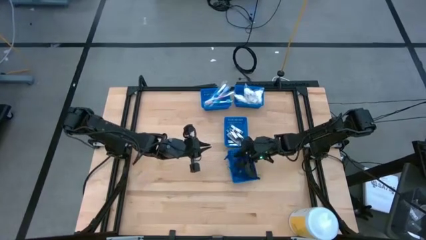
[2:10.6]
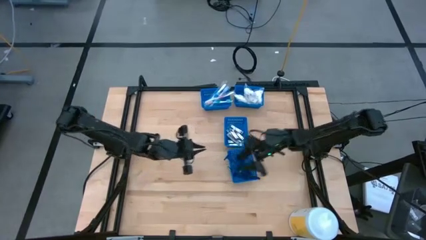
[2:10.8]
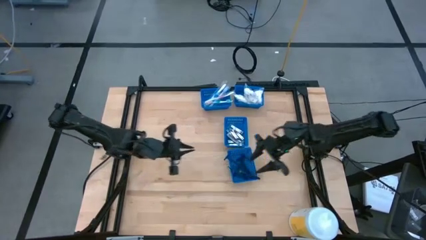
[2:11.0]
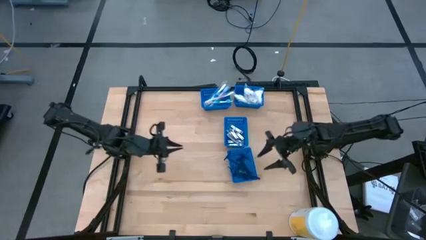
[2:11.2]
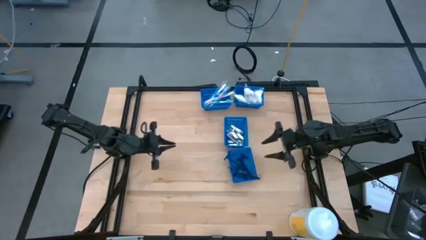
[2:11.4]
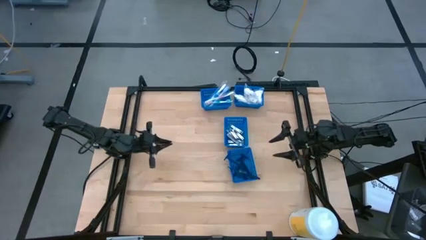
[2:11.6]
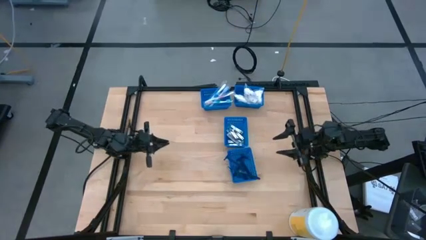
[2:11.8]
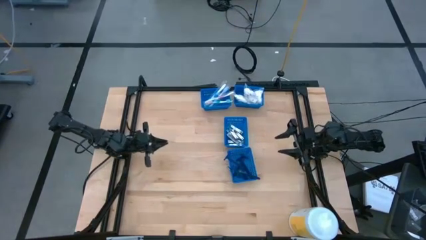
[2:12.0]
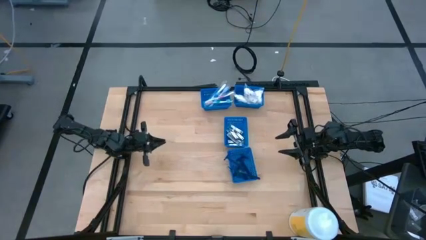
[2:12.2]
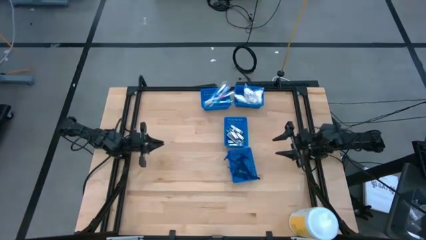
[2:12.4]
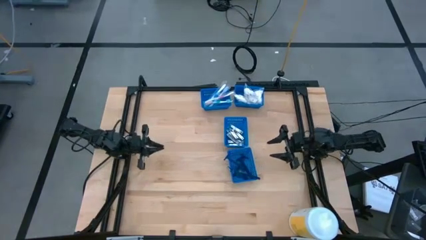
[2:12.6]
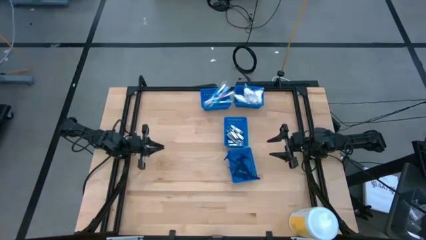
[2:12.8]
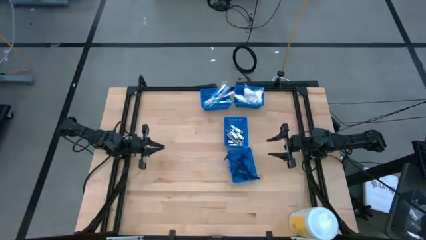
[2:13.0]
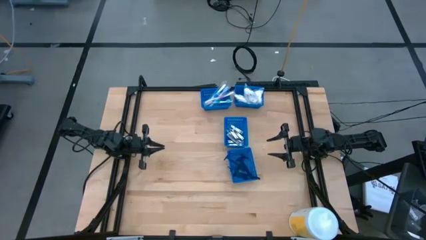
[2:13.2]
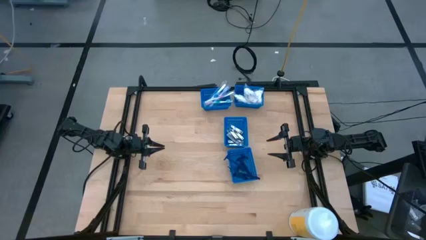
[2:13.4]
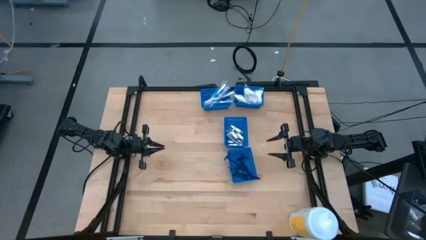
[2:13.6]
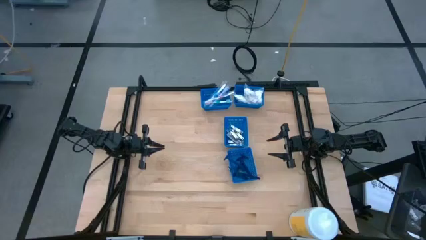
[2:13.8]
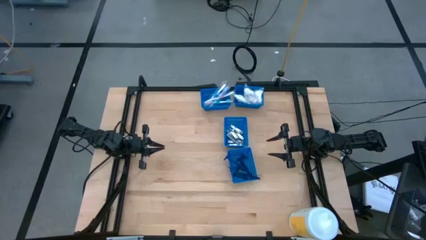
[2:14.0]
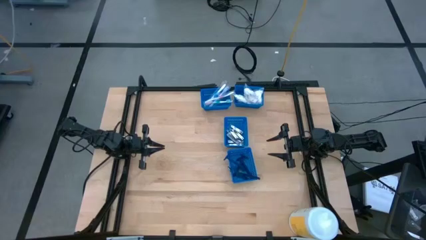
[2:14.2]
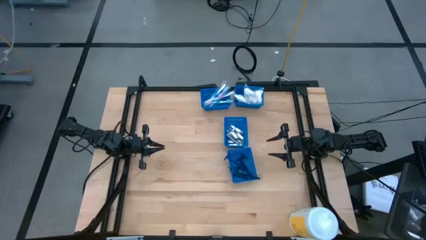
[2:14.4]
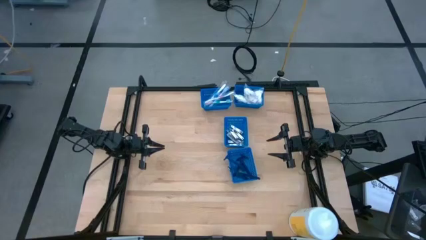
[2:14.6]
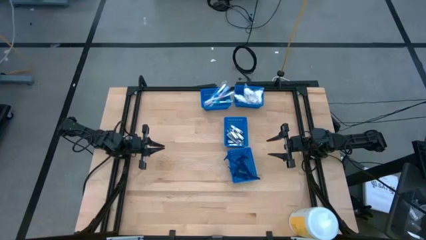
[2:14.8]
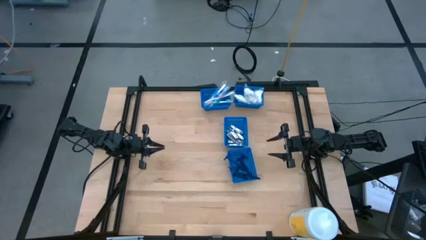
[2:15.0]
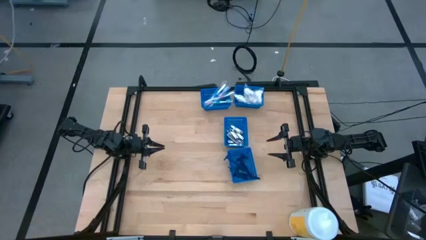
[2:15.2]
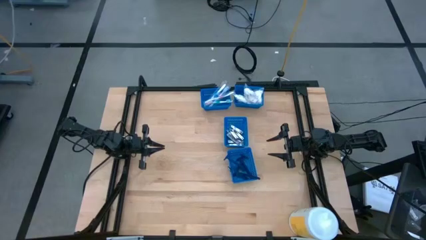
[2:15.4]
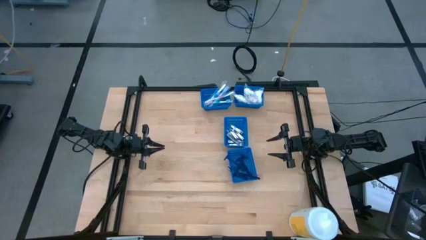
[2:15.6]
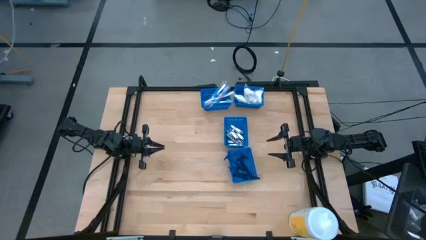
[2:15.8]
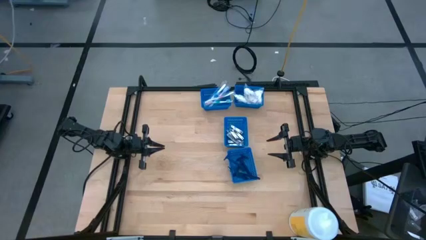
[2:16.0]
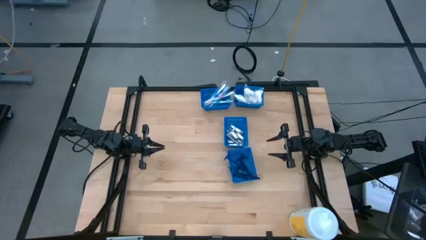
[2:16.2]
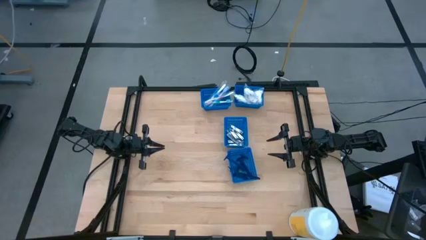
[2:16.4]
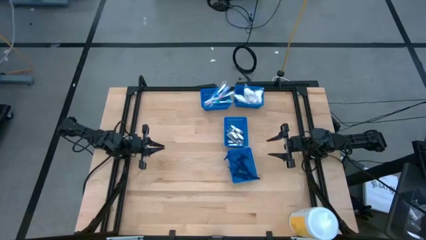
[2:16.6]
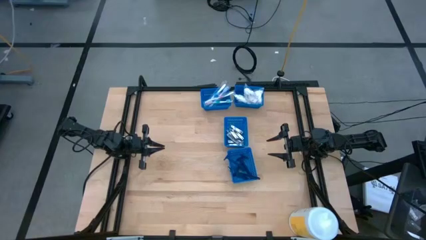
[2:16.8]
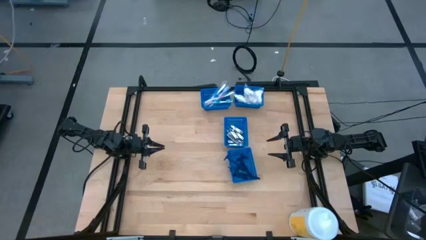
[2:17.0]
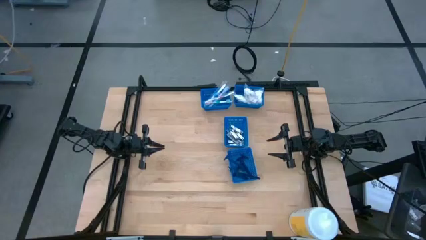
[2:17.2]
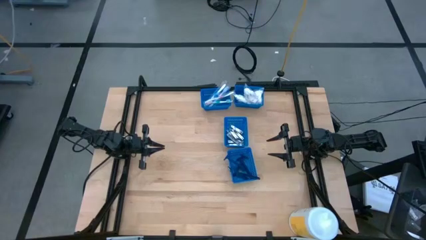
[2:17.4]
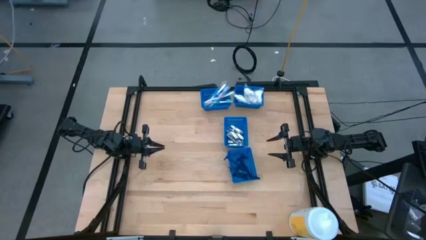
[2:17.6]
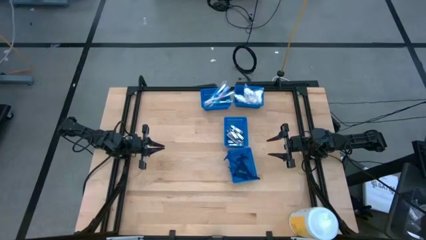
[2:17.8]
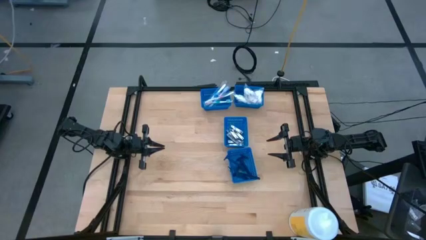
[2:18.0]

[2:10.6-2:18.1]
Task: Pick & Place Travel size toiletries
Return to Home Position

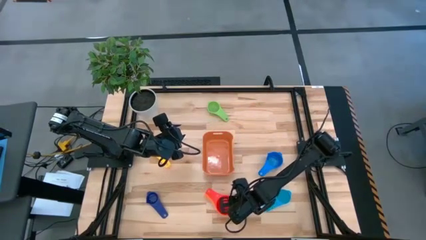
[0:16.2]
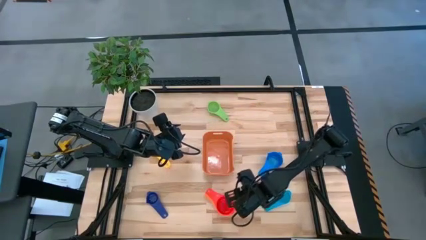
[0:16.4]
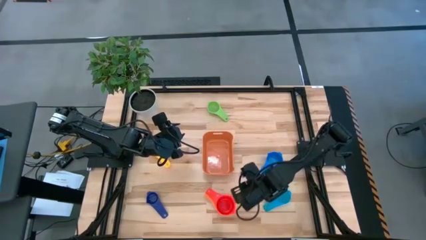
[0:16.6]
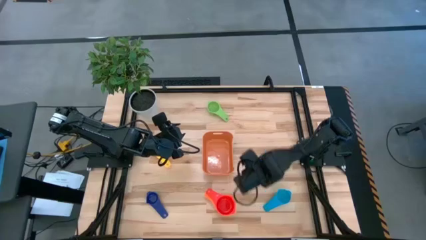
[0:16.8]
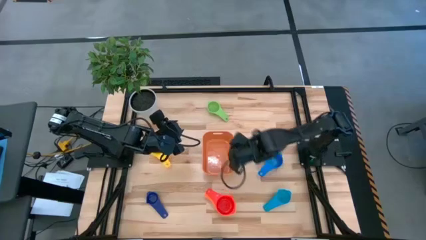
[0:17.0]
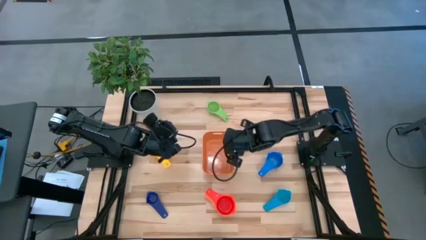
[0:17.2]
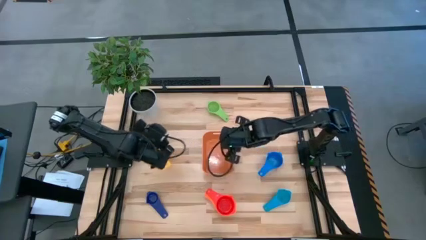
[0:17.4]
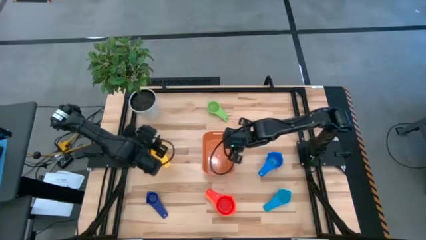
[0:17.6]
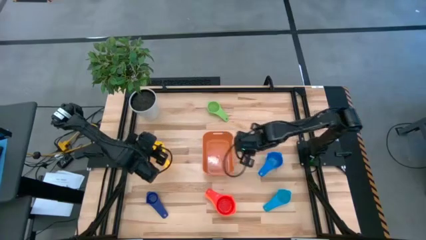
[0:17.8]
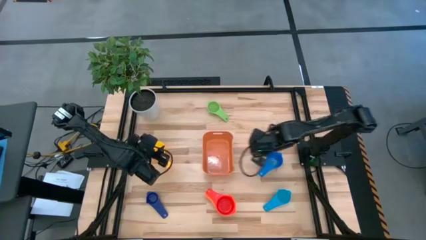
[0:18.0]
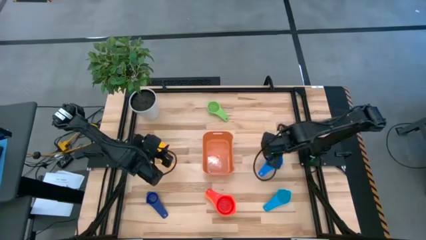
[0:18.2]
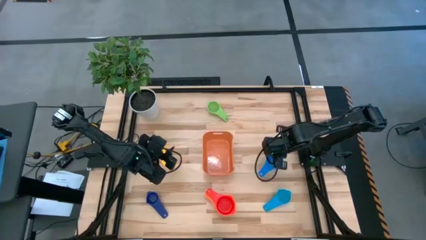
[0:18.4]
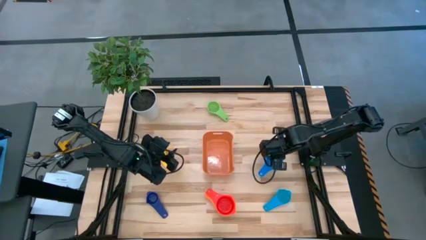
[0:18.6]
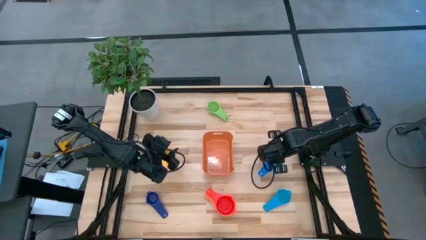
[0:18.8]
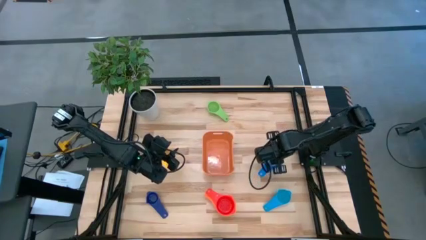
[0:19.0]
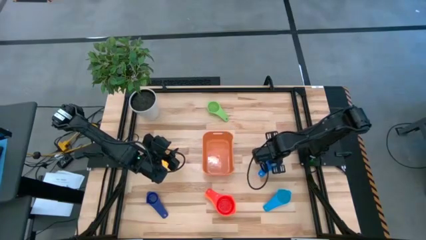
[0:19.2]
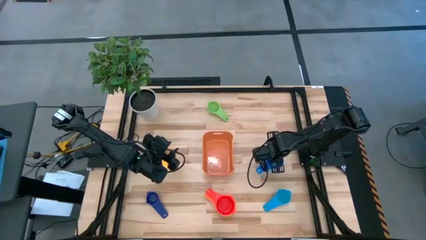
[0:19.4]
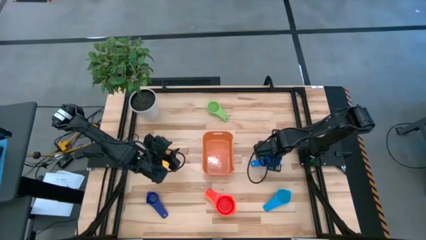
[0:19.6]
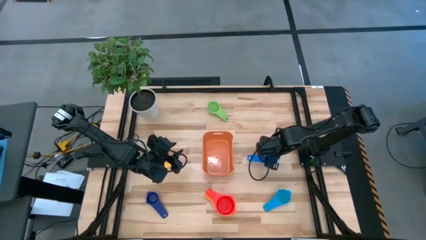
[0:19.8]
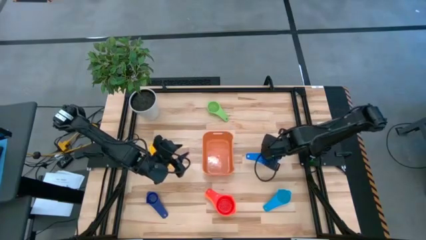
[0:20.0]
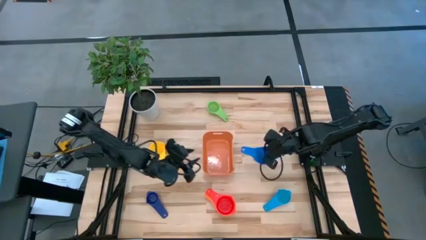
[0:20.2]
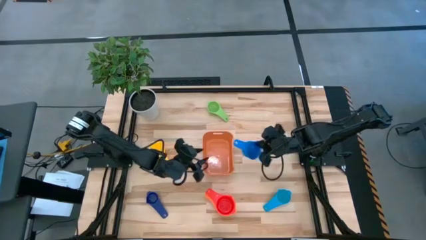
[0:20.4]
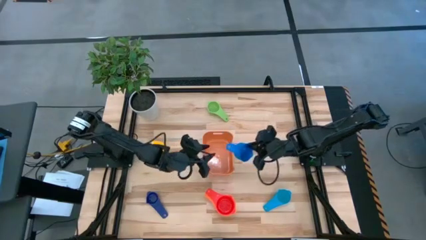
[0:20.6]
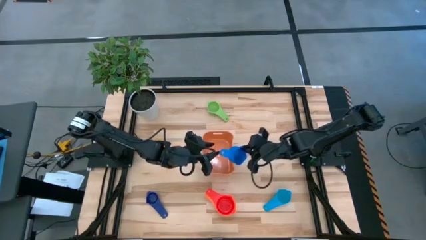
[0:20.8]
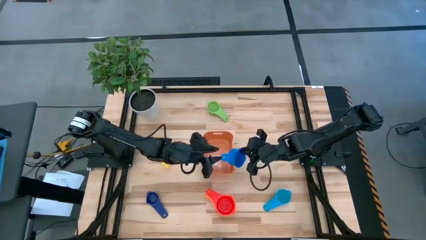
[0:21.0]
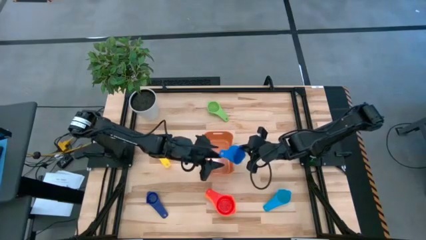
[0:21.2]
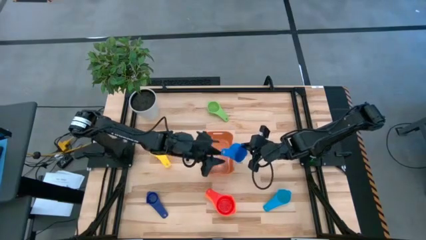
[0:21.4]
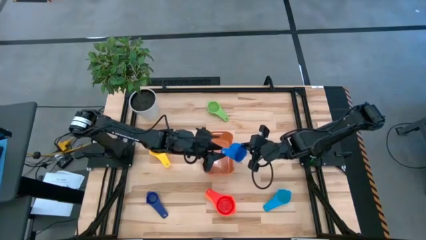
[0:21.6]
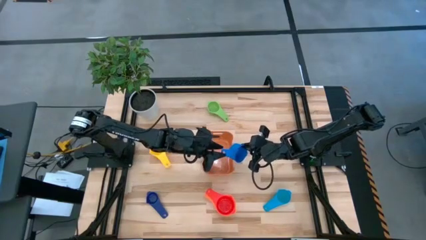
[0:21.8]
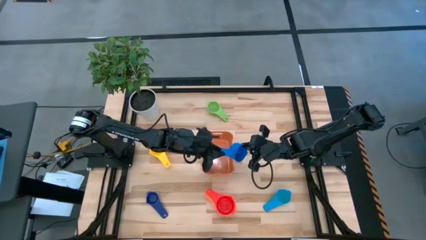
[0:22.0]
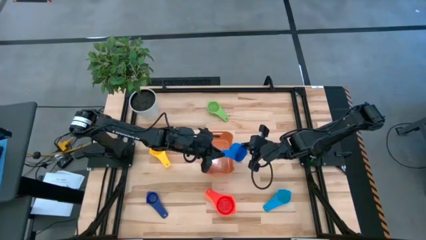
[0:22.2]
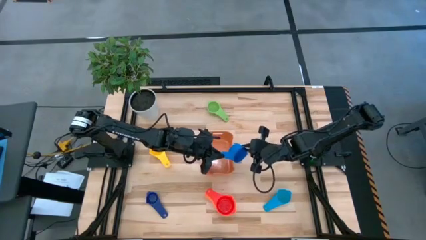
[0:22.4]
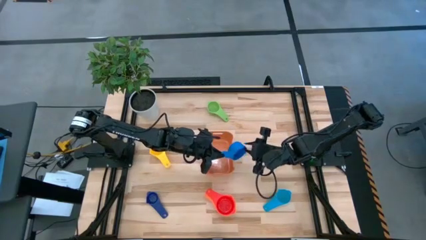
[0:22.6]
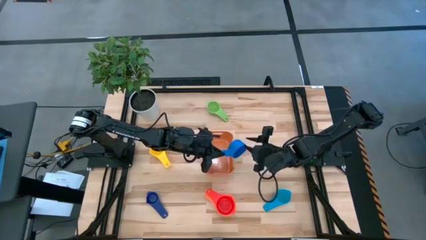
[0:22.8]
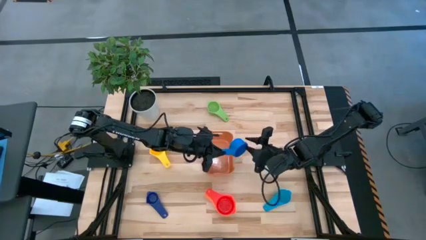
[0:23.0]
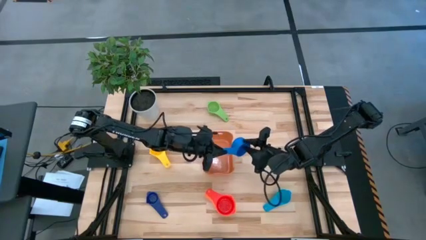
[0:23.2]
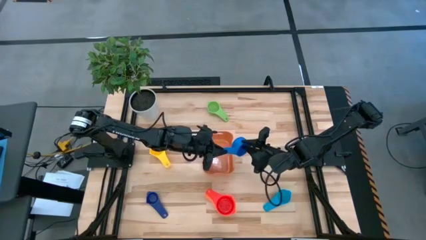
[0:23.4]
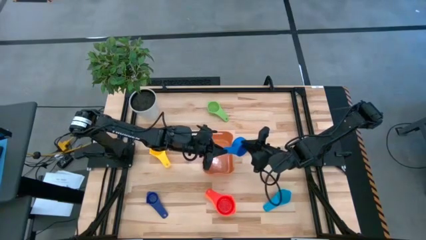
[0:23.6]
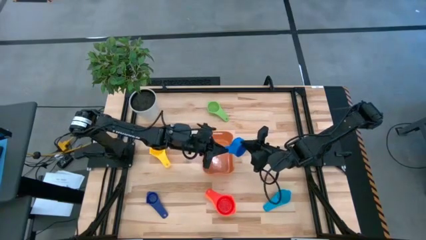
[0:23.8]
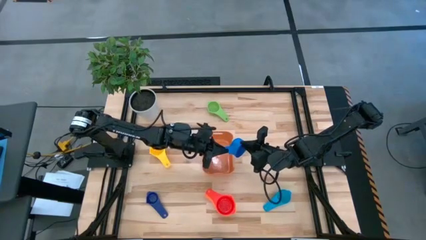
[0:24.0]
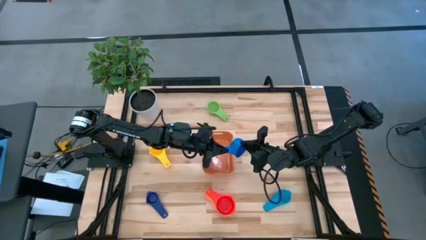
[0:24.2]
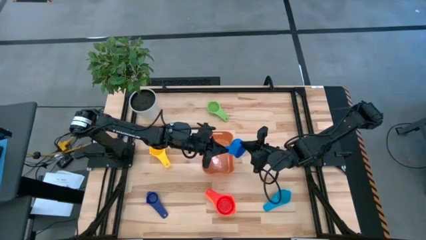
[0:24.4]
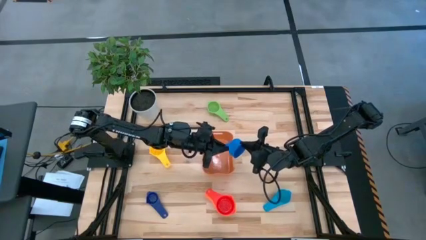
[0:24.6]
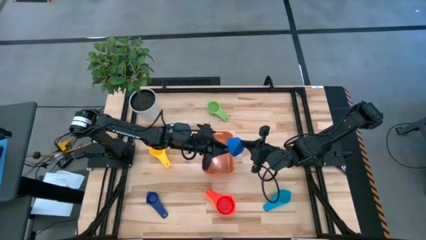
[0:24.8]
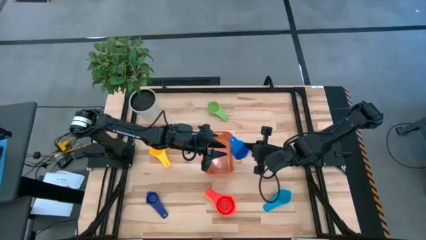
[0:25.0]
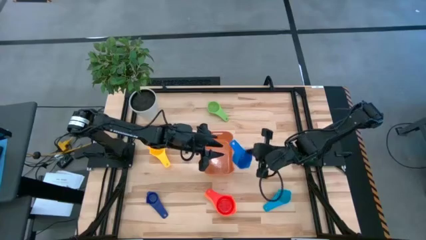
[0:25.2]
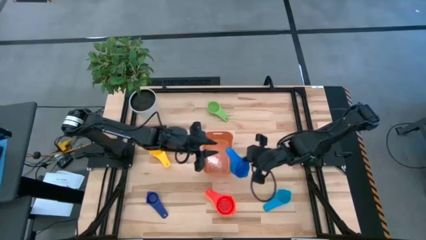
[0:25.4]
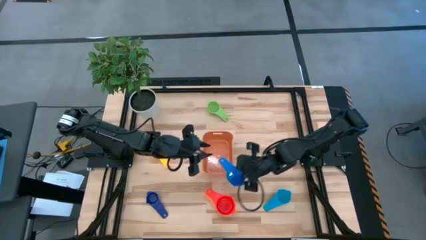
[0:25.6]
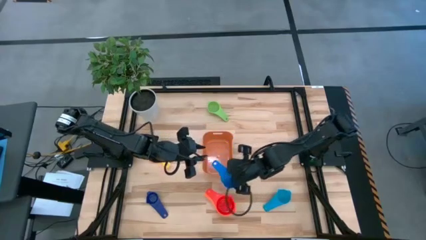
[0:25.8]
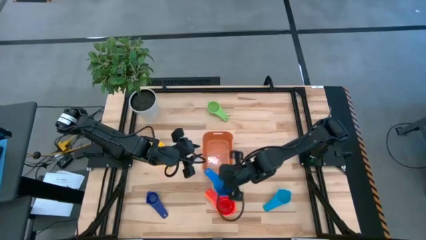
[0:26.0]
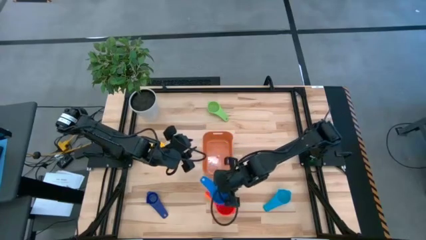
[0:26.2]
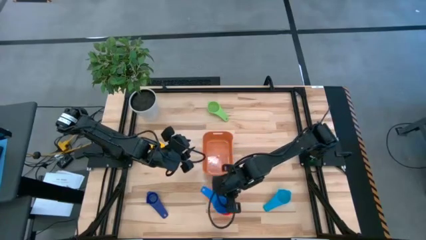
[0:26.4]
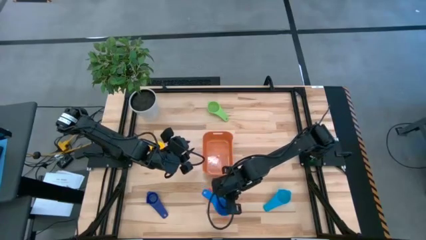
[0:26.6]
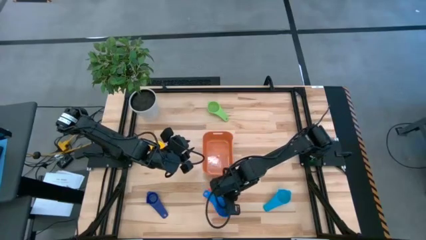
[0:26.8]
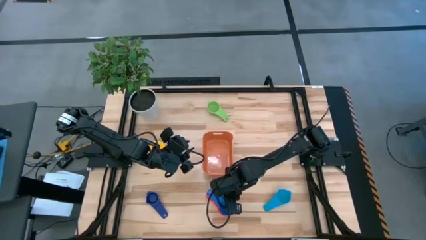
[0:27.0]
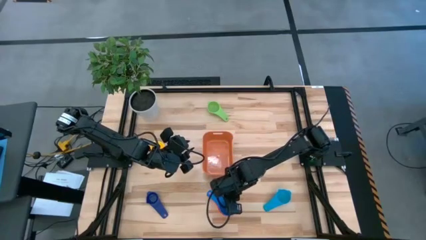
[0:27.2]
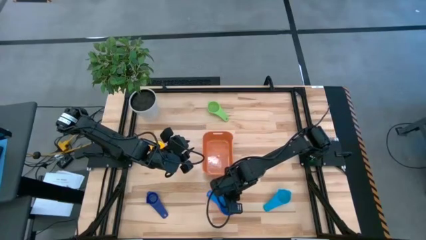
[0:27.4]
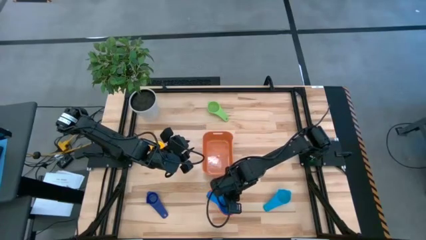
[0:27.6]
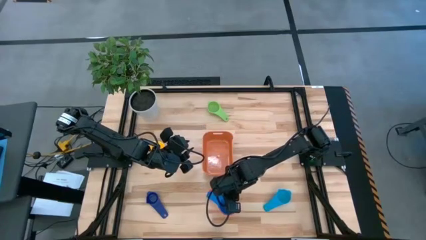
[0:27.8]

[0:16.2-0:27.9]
Task: Nest measuring cups in basket
Stack the blue measuring cup on top of the red measuring cup
